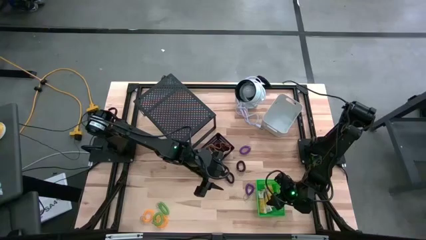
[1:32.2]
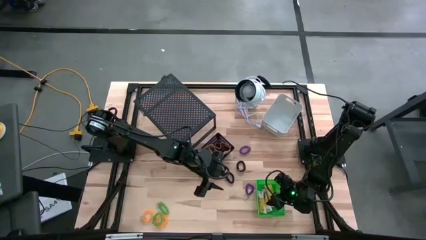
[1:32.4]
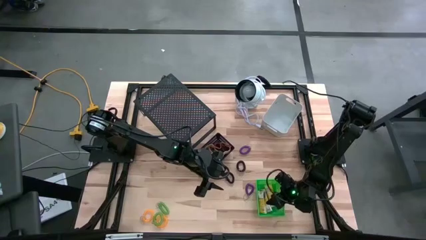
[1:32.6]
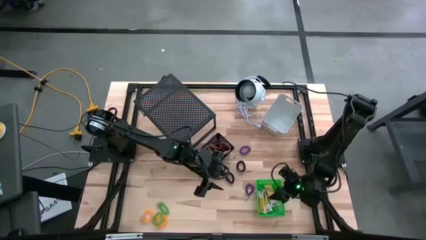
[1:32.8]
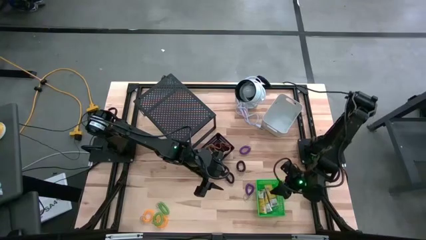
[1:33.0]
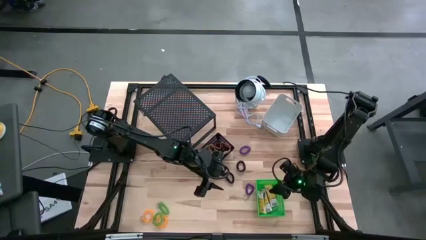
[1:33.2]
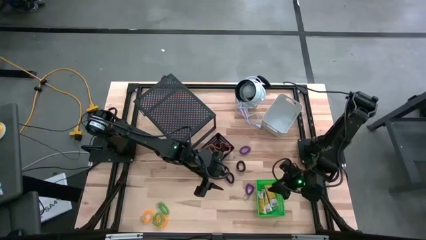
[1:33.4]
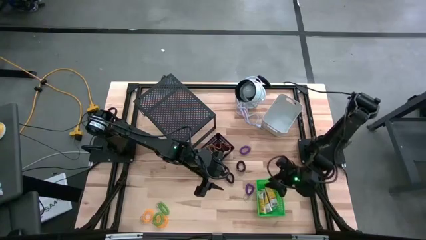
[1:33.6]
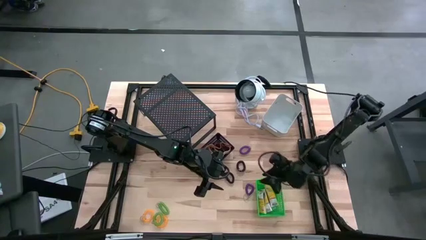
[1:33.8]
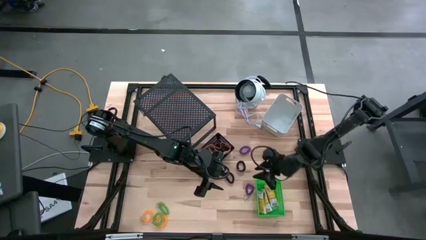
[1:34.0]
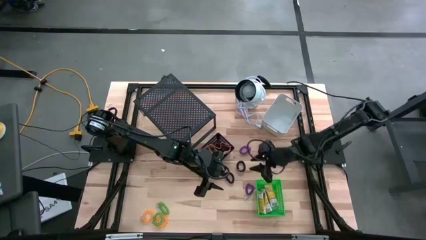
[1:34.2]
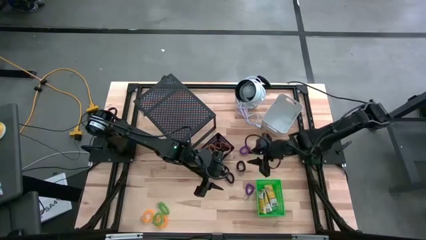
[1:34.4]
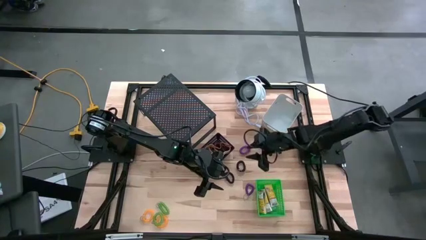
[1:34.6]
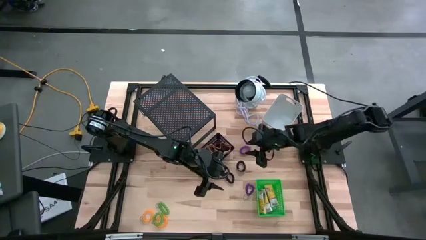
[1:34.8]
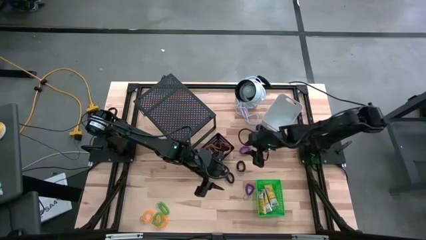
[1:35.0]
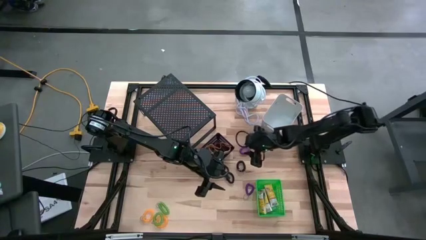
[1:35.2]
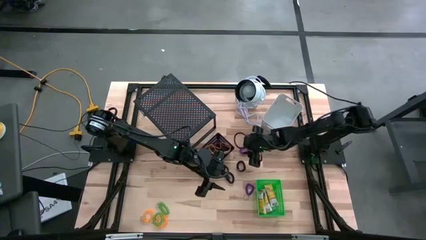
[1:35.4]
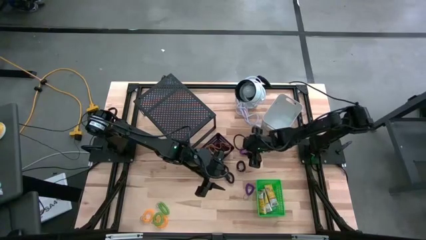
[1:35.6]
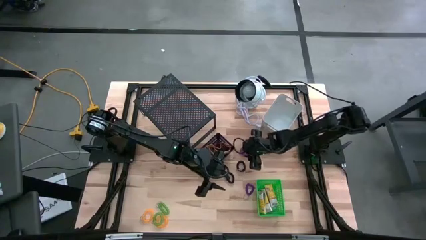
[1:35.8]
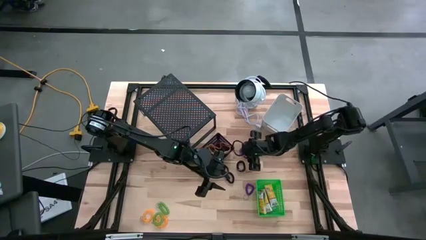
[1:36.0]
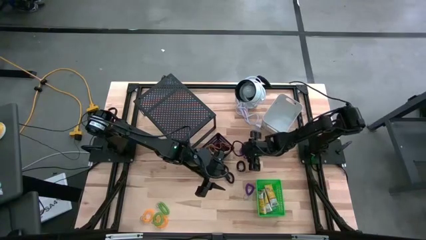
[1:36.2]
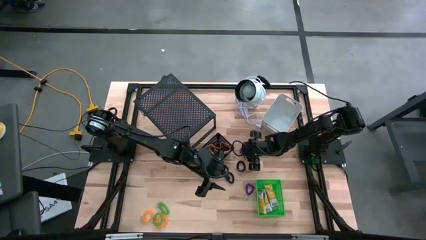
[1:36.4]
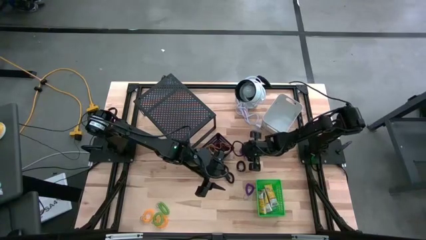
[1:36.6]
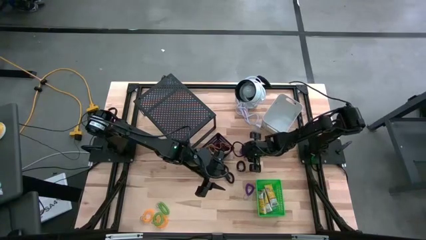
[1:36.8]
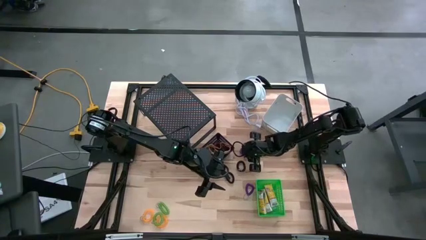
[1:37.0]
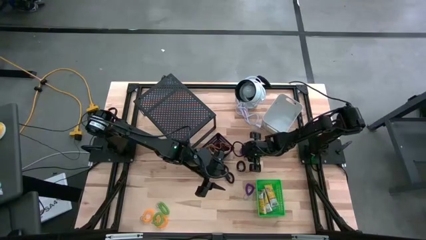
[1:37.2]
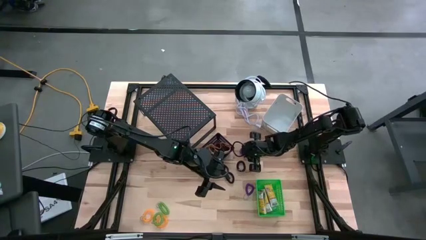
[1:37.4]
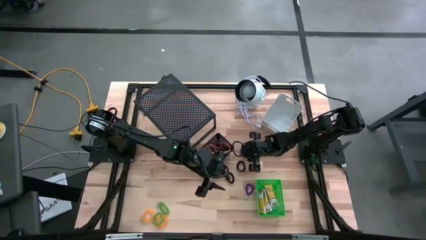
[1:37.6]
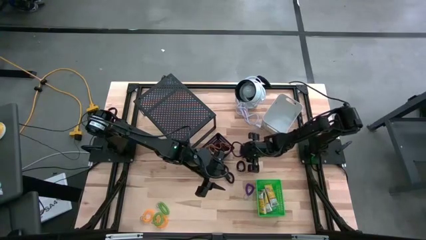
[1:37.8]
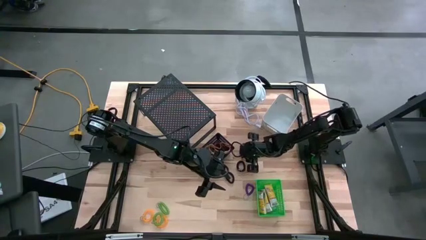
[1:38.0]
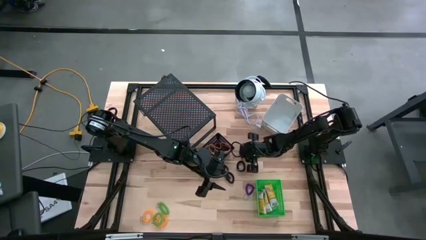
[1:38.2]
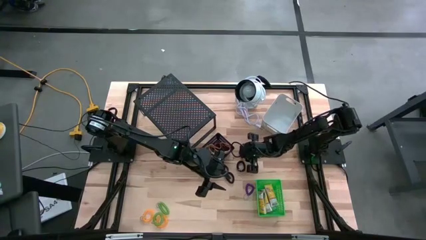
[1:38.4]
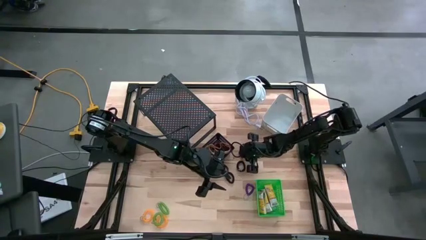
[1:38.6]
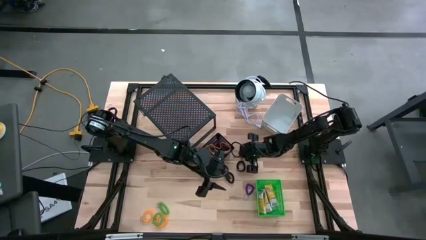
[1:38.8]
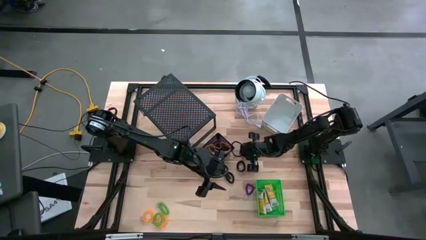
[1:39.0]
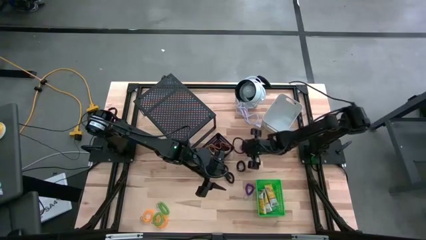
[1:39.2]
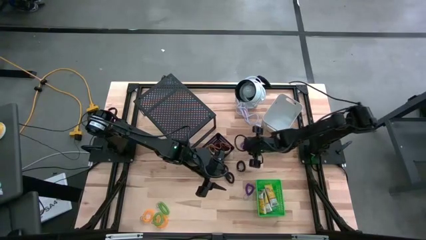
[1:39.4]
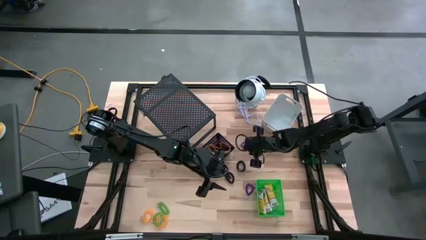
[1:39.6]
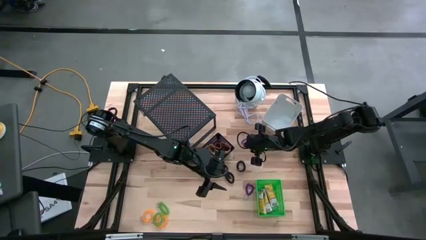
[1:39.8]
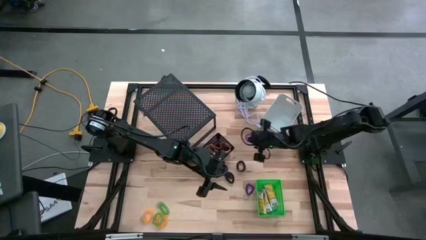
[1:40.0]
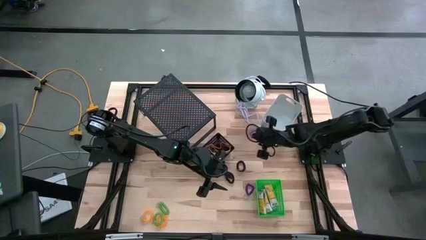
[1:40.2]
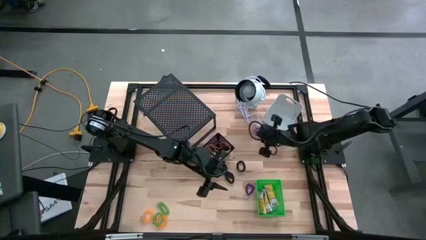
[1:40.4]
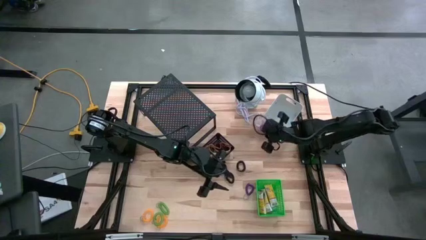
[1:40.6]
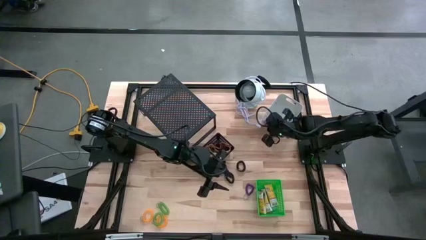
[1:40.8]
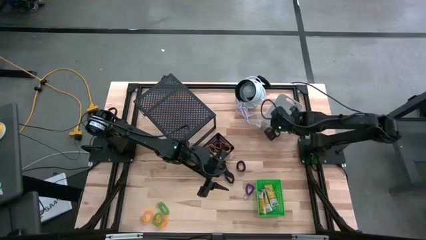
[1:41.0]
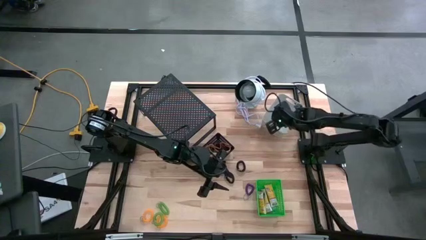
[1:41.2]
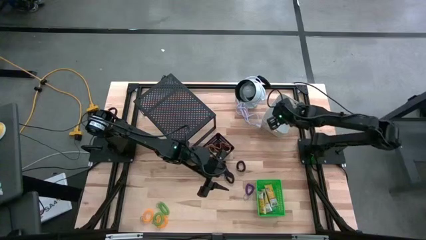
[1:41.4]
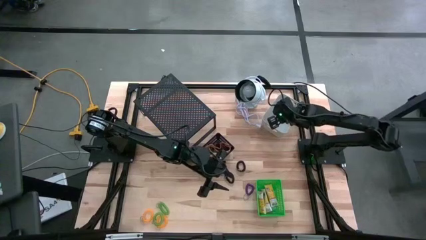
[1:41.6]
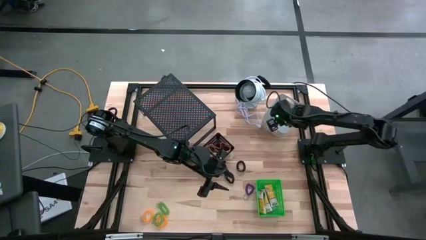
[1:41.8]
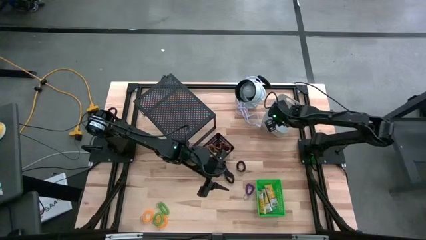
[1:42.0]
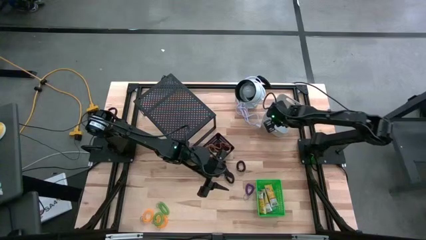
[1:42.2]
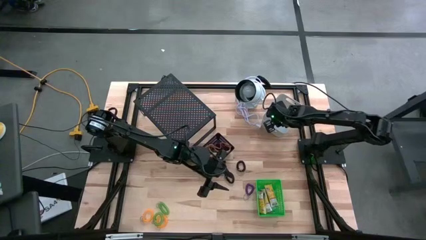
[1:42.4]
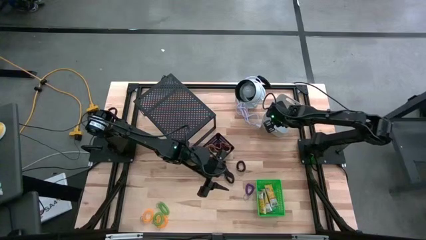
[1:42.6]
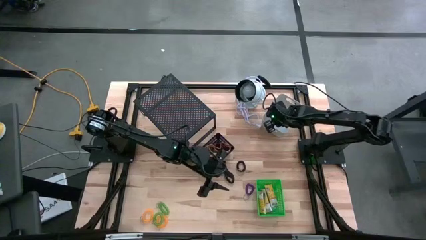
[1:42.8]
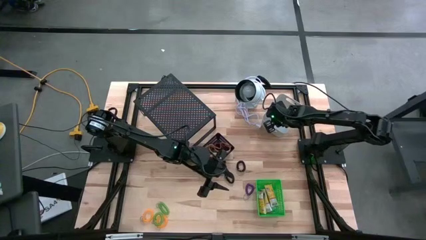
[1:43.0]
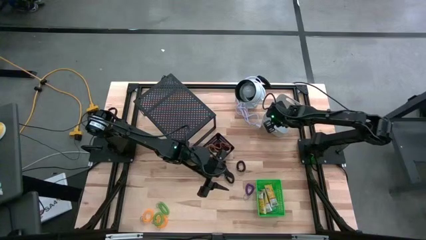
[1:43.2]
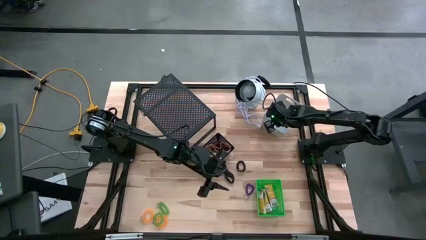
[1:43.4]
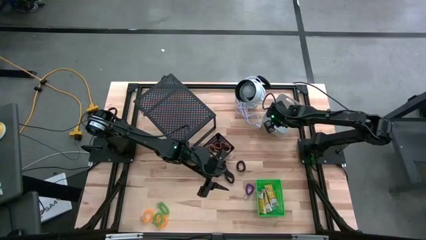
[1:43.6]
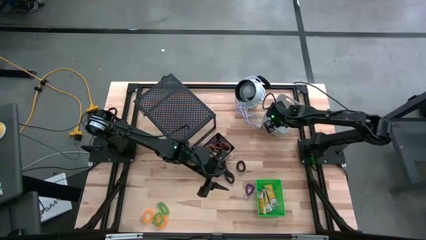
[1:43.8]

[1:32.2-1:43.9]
Task: Pick & Place Office Desk Supplies
Put the top purple spring keychain into the white bin

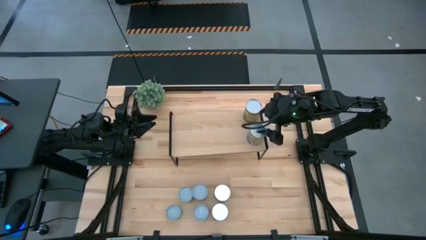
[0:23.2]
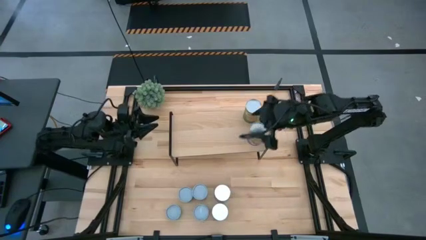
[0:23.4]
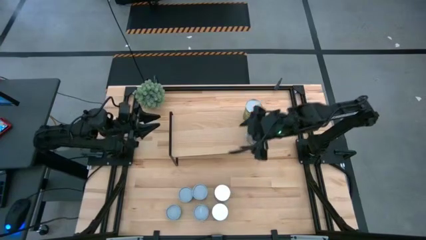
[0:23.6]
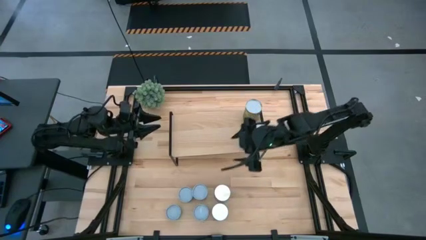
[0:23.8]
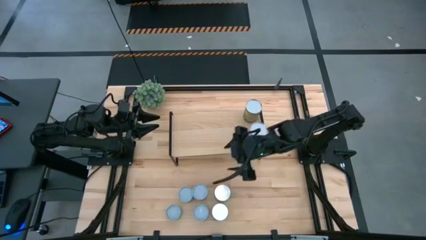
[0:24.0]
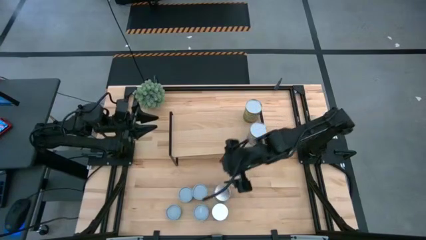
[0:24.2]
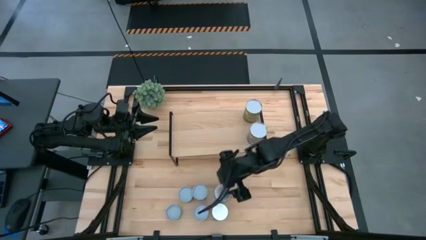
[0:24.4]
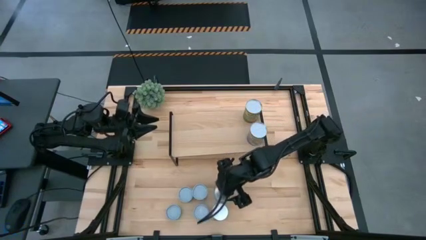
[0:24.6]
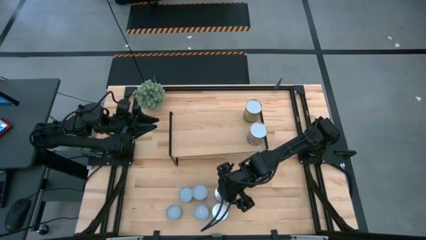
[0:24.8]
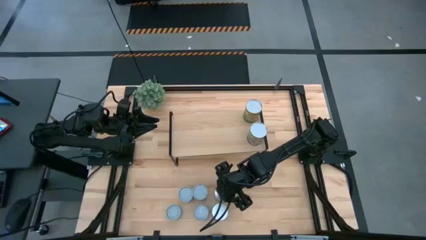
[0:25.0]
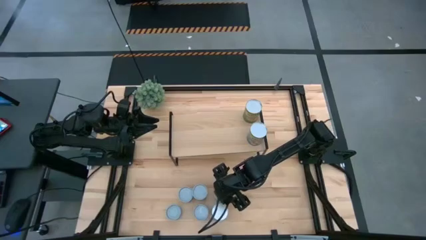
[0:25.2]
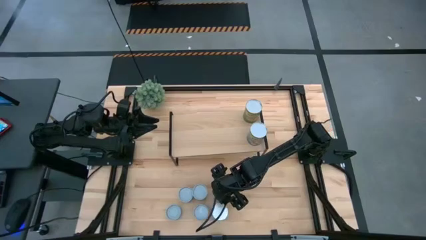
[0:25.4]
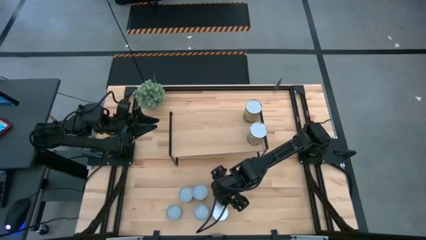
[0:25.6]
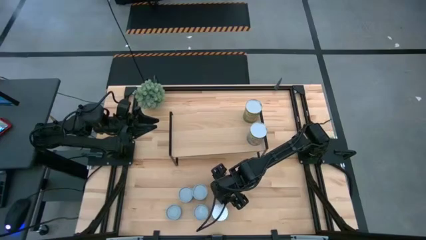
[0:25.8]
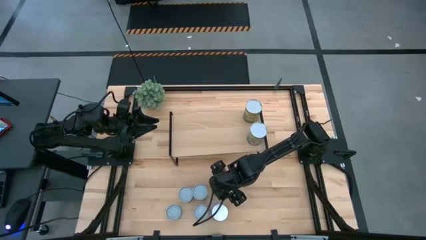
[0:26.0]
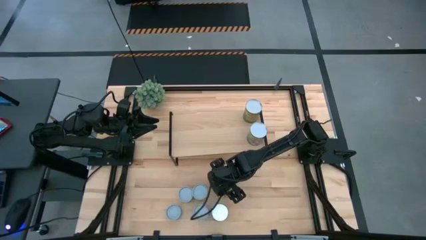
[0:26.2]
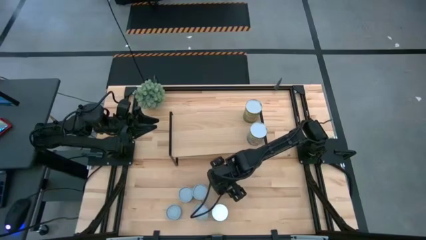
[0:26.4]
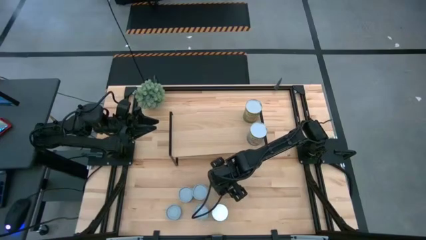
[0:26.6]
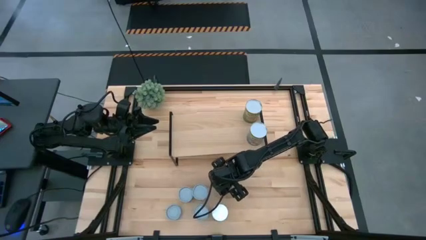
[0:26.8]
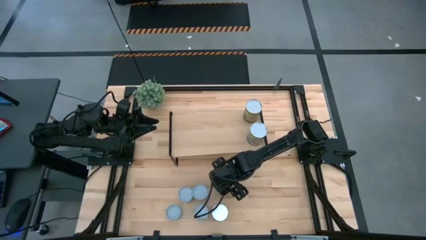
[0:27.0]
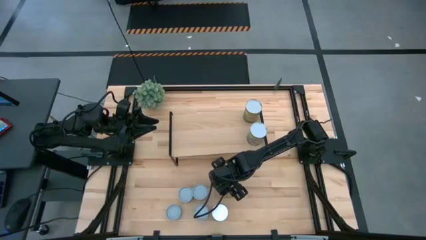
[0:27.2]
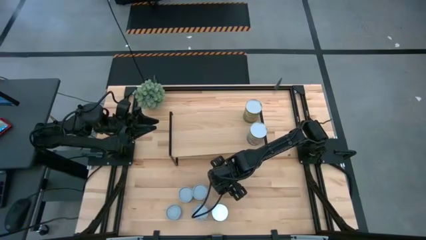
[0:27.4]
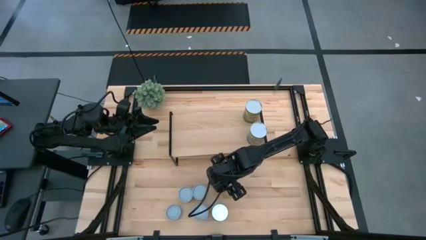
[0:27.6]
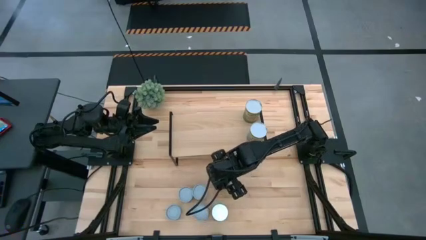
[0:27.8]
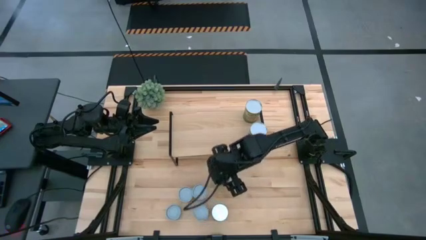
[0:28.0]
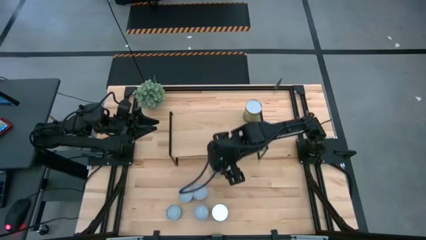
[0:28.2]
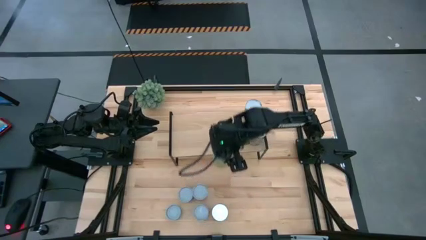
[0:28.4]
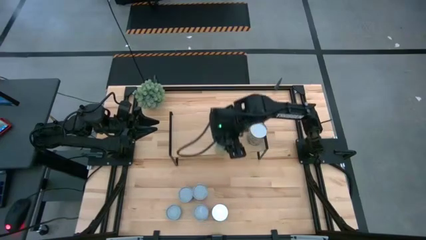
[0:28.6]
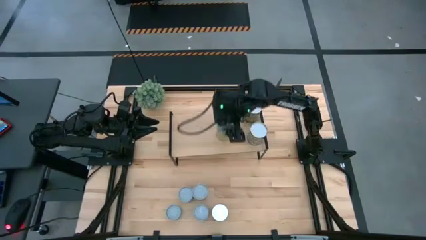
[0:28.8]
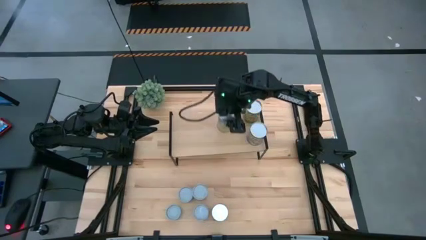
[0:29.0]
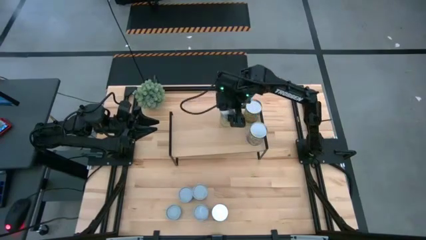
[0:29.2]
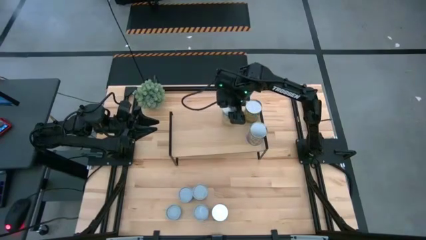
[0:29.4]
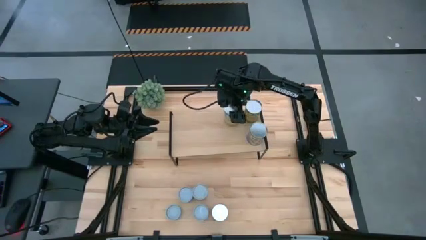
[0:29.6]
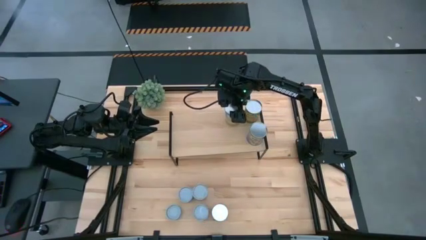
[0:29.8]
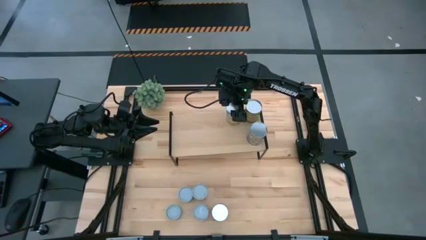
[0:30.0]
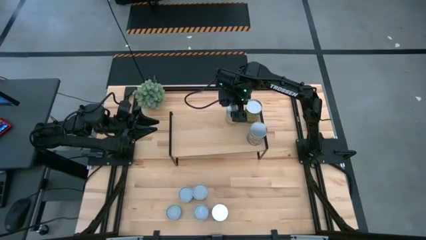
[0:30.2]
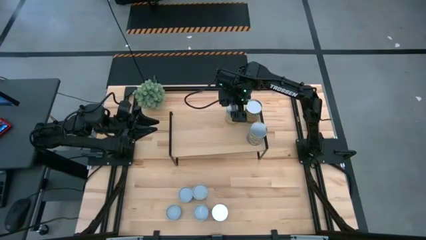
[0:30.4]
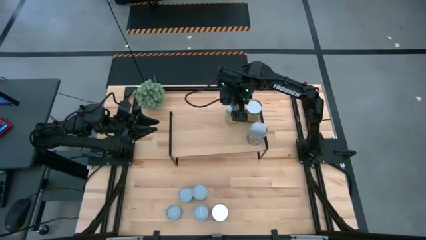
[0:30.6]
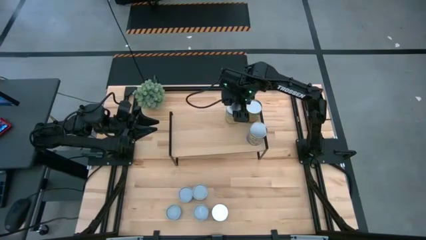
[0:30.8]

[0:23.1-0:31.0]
Task: Pick and place cans onto a shelf
Put the light blue can on the shelf
